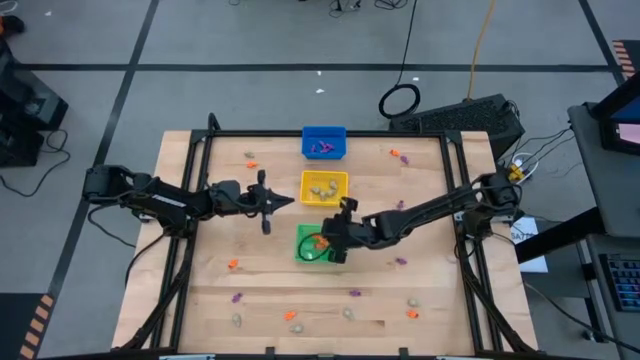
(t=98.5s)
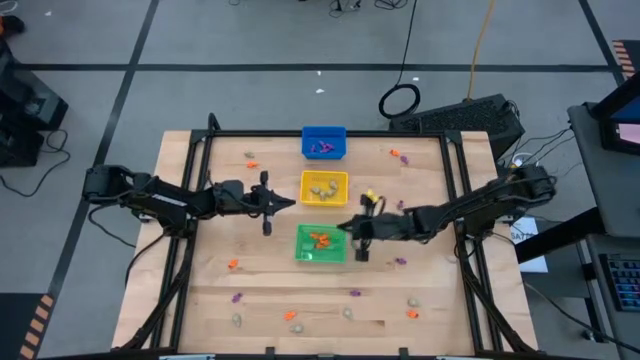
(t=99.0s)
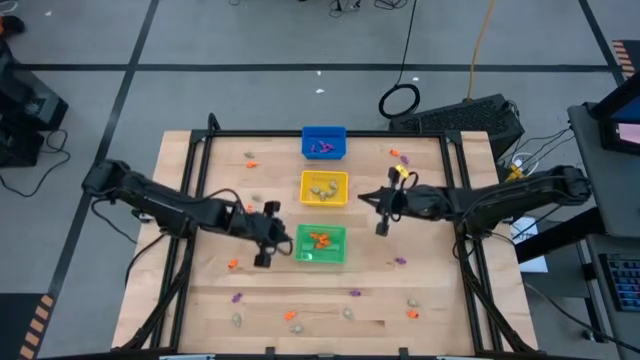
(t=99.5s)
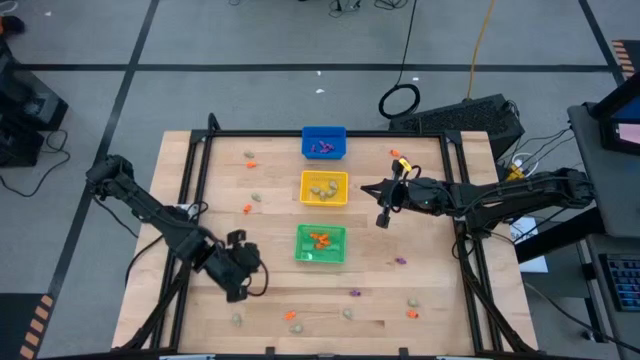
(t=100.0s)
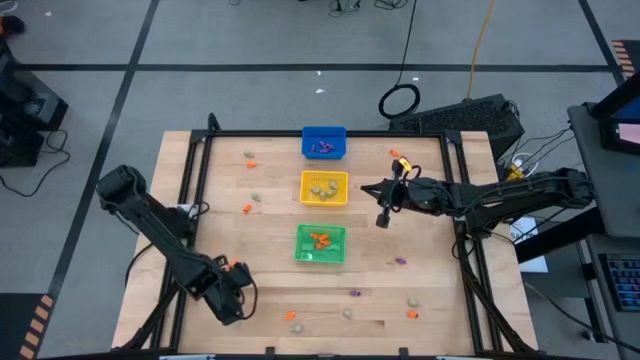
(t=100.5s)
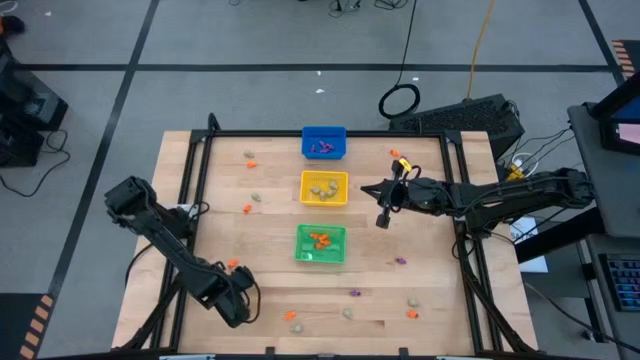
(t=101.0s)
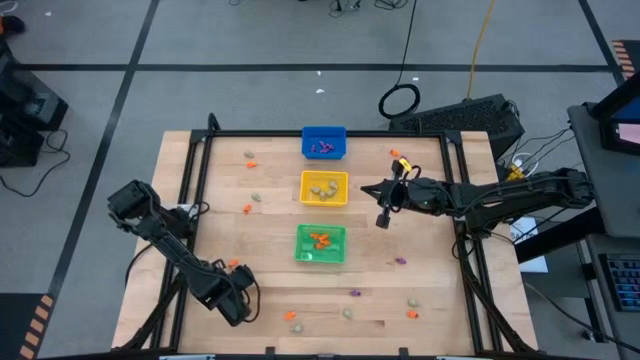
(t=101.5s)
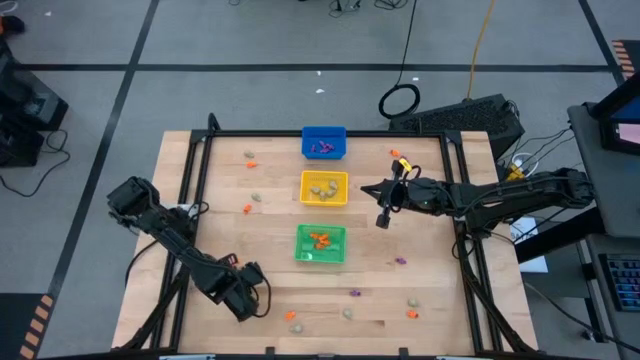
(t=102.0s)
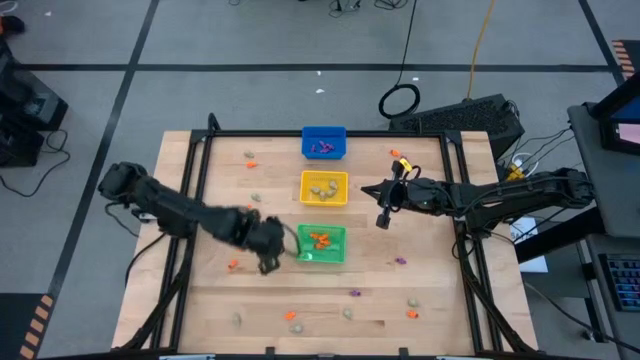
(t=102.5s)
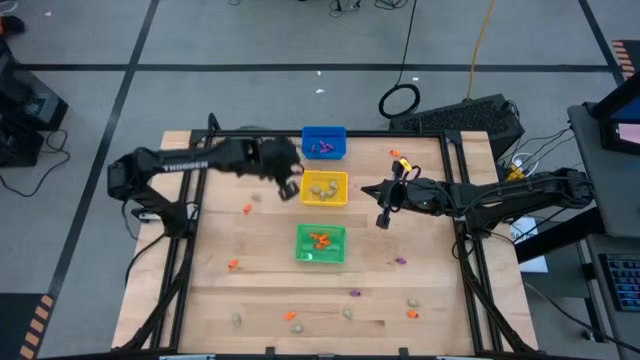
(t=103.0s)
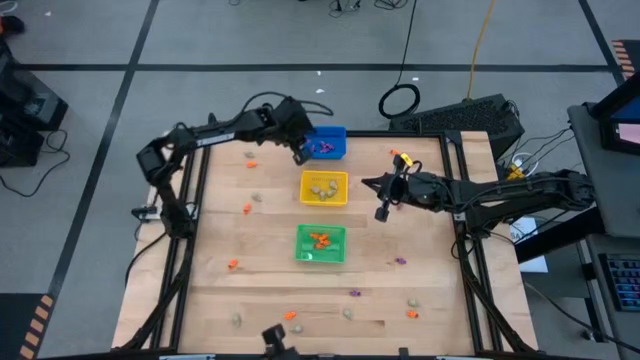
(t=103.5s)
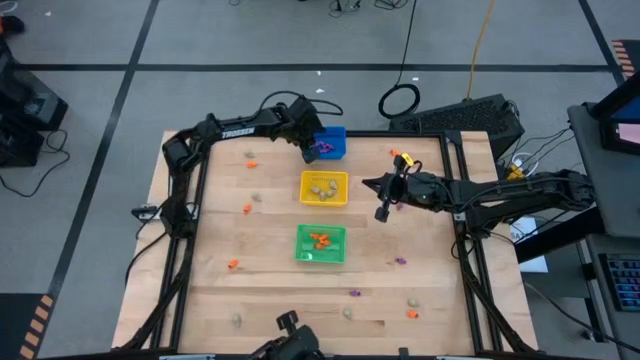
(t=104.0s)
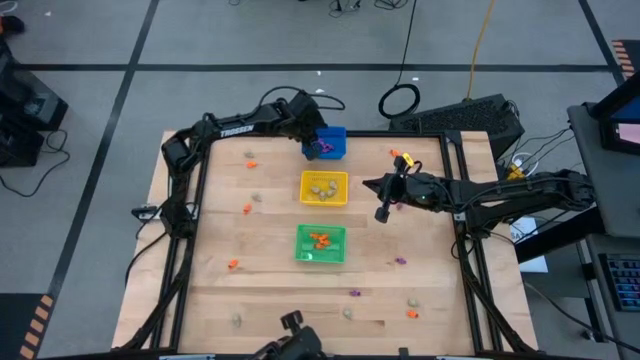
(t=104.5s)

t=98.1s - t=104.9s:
Task: Sort Halloween decoration
Put the purple skeleton toy into the blue bin

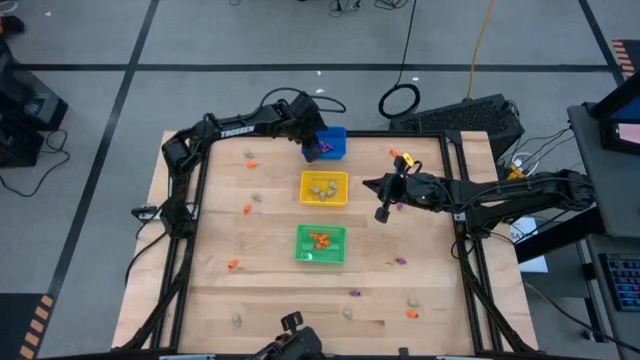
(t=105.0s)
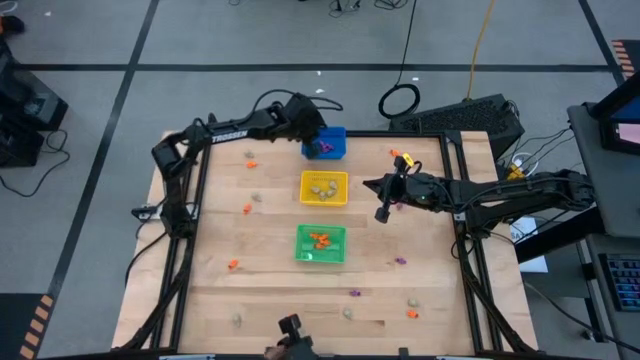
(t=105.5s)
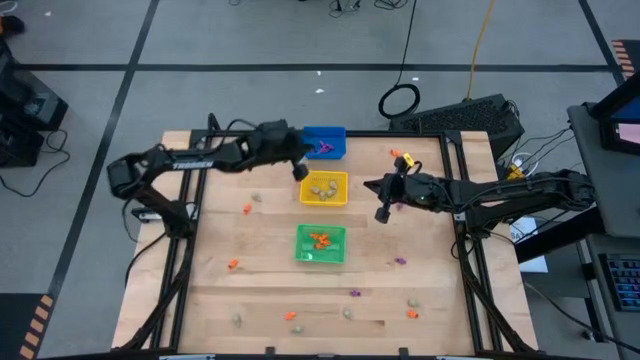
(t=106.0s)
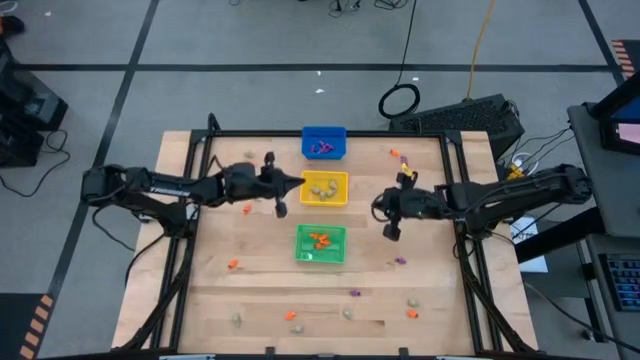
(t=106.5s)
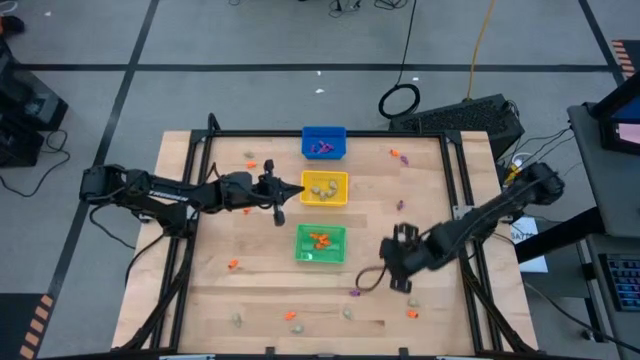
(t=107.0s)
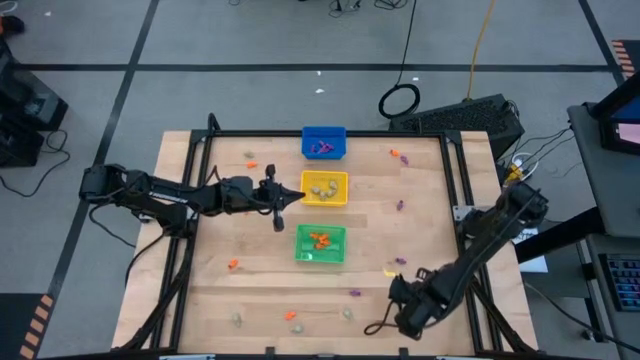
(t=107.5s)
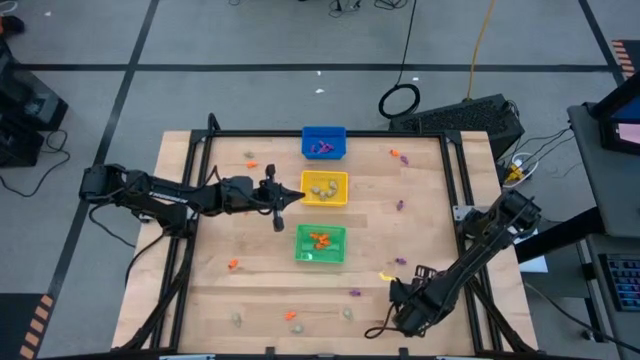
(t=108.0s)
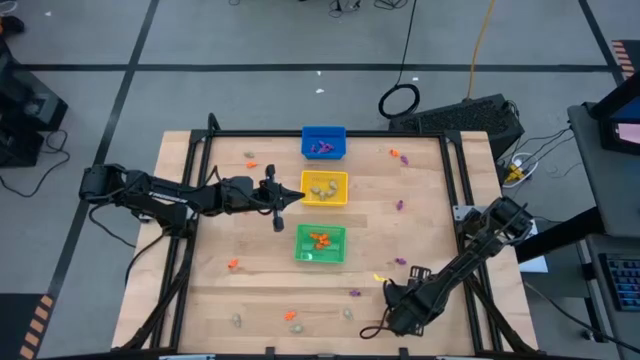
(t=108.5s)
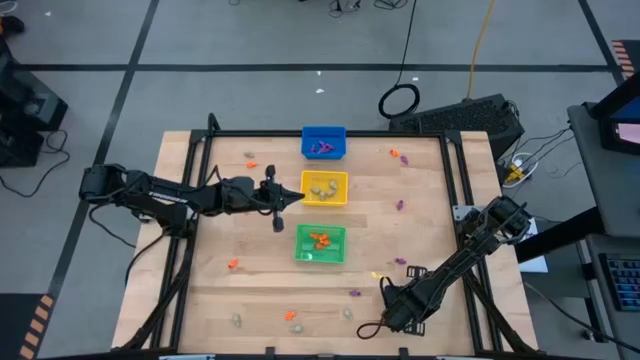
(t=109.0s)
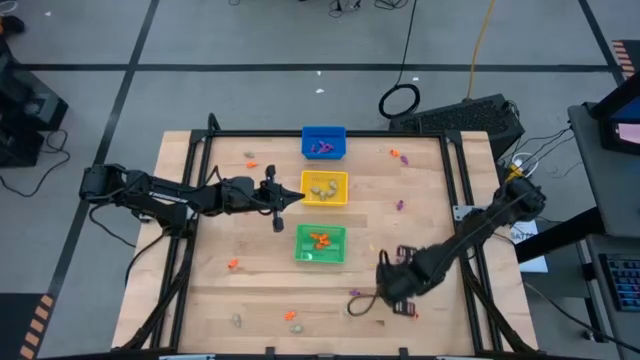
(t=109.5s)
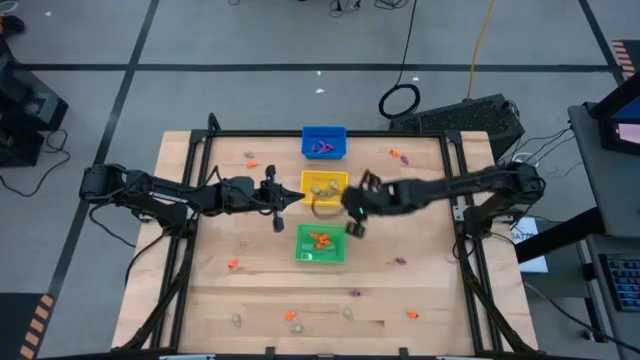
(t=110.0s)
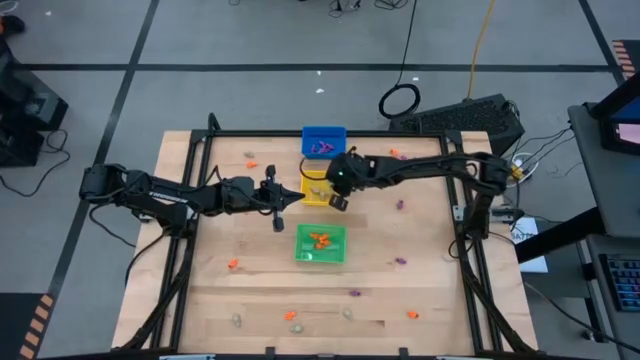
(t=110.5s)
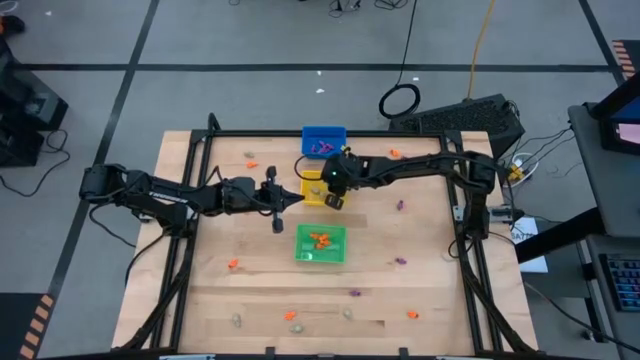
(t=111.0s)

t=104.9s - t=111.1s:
Put the skull toy into the yellow bin

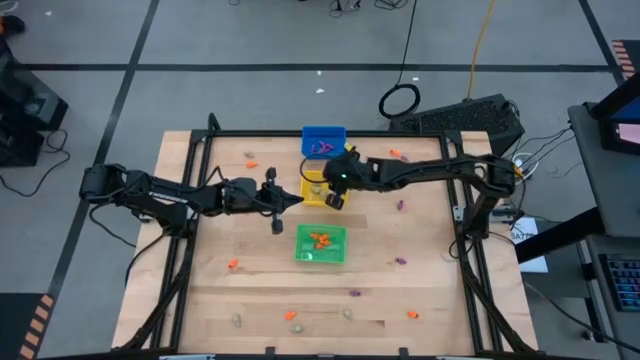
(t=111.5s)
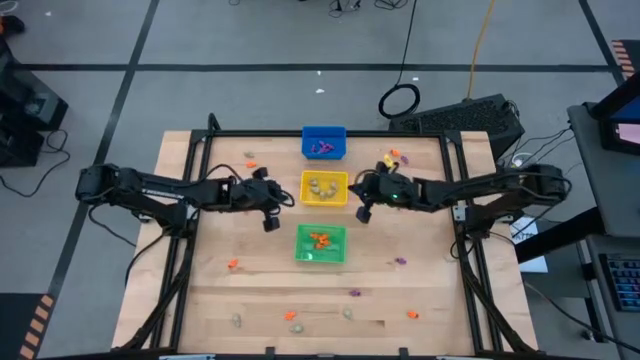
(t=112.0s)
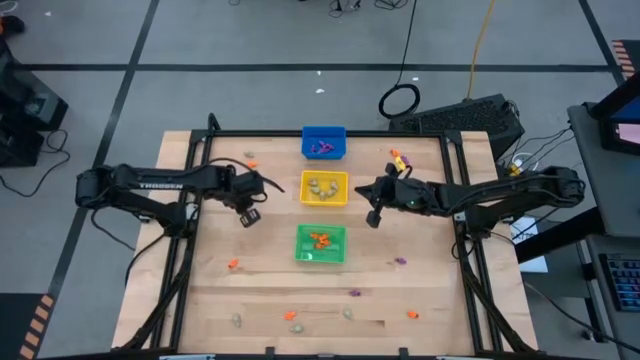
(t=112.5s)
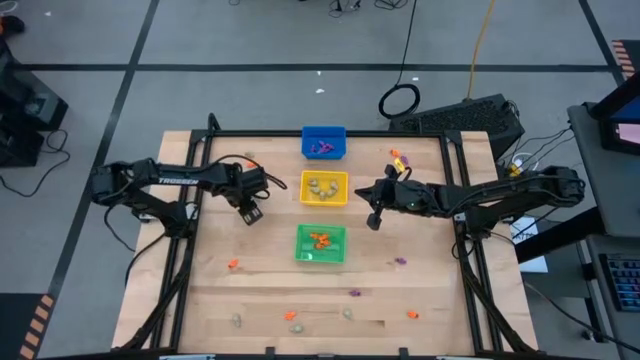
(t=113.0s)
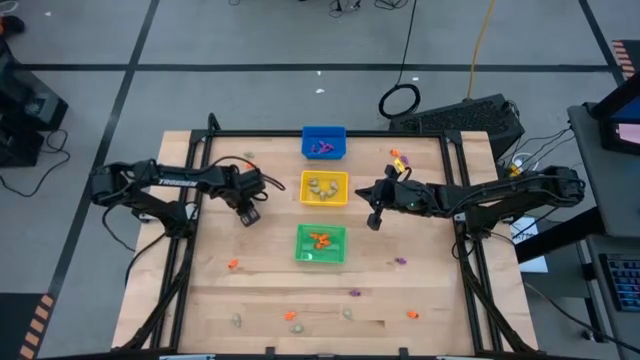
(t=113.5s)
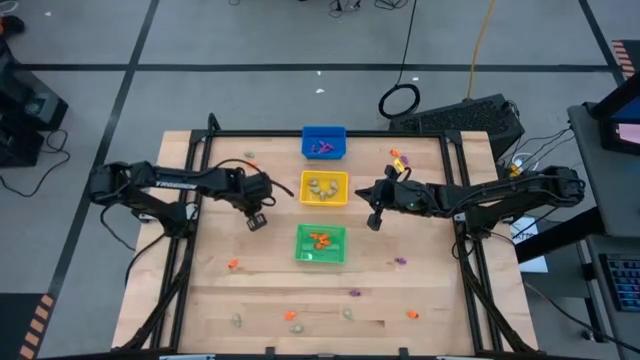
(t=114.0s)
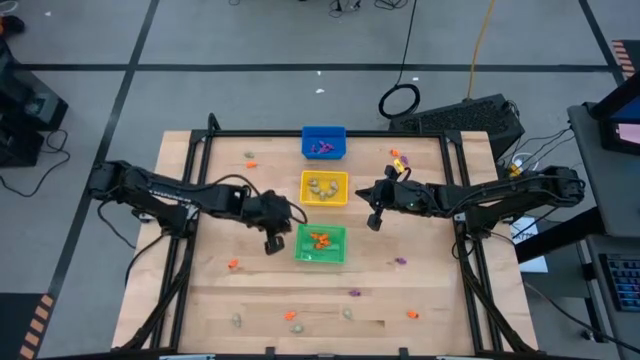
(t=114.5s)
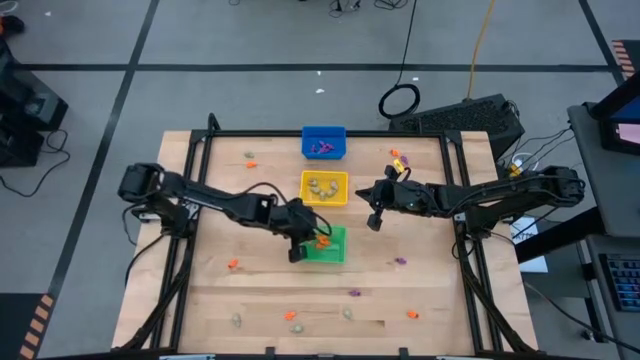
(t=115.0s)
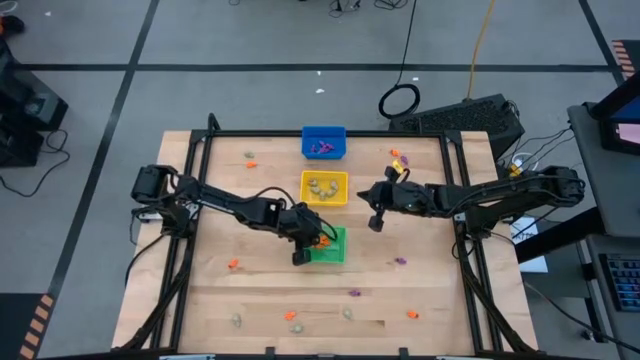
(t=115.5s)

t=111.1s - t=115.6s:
Put the orange skeleton toy into the green bin

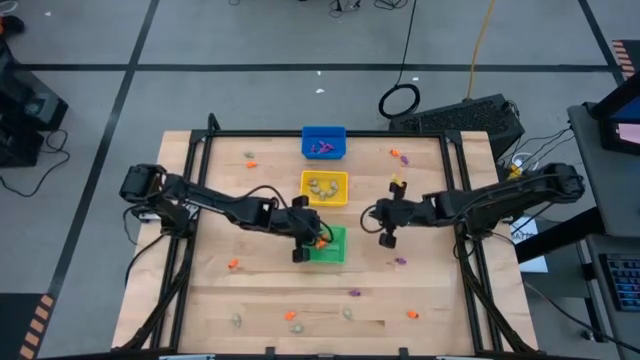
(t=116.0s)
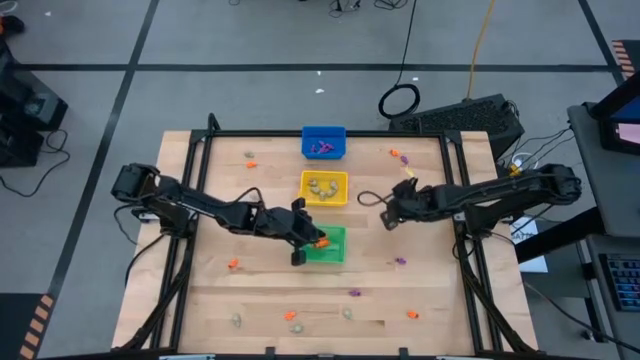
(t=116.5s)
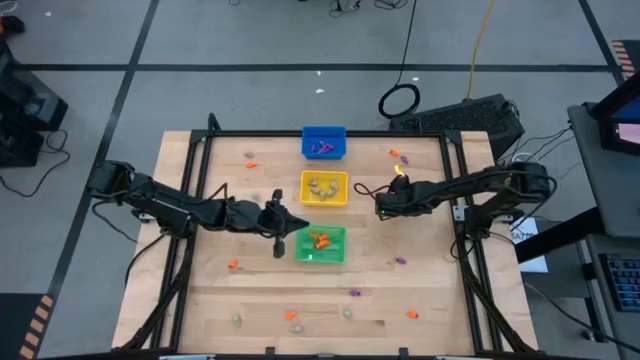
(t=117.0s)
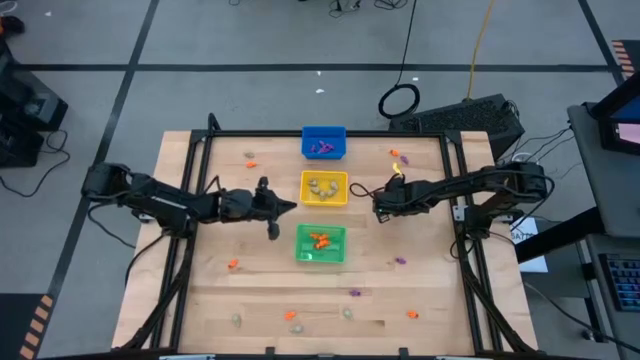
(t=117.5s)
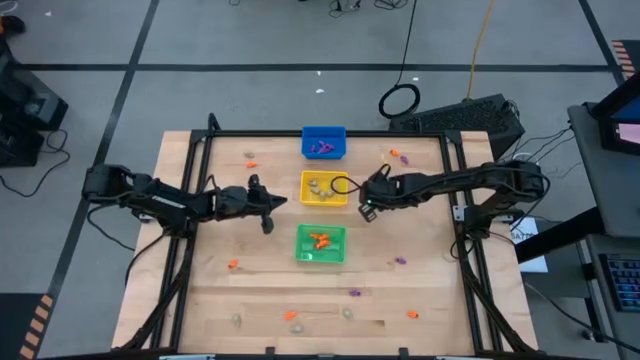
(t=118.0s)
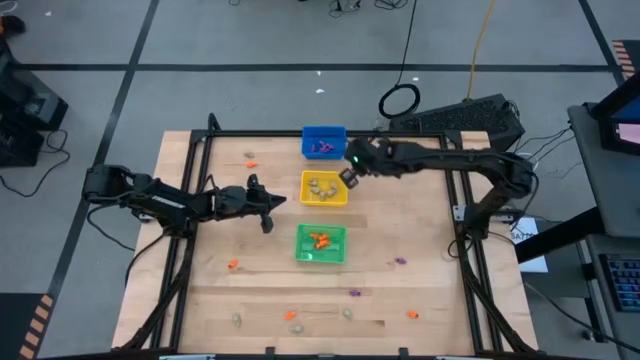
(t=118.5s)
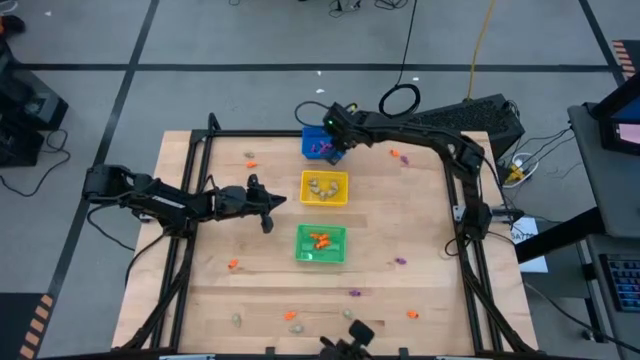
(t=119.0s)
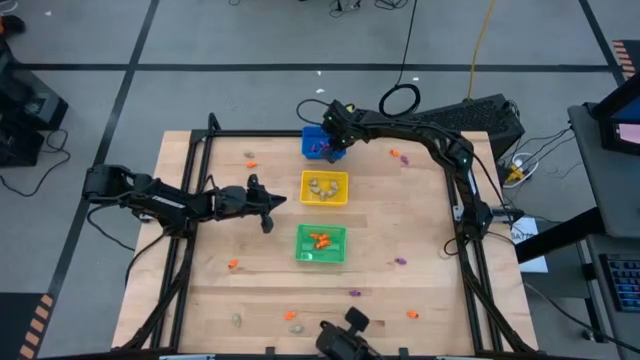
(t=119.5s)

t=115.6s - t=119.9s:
Put the center purple skeleton toy into the blue bin

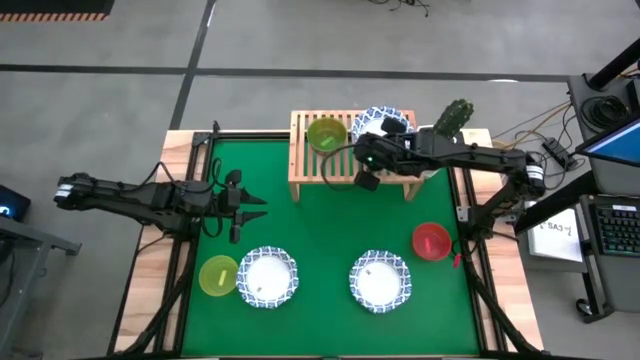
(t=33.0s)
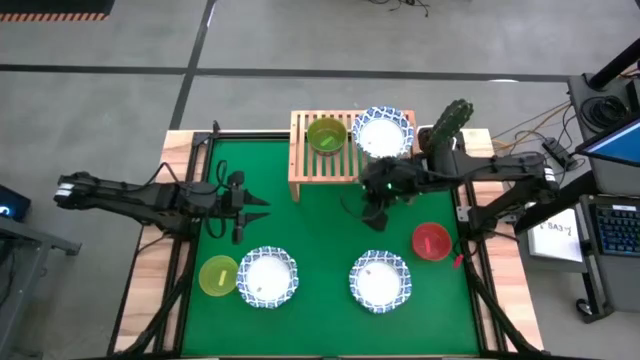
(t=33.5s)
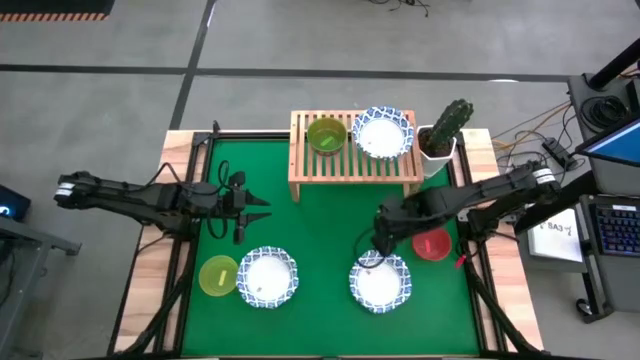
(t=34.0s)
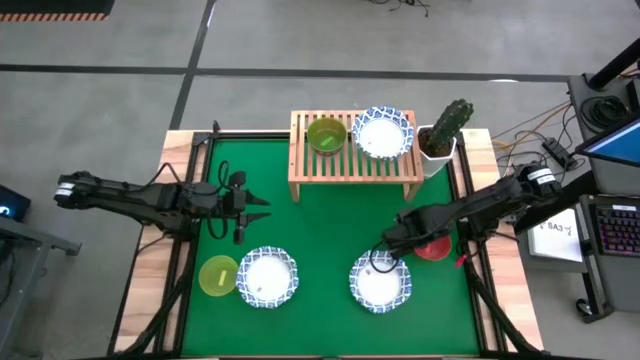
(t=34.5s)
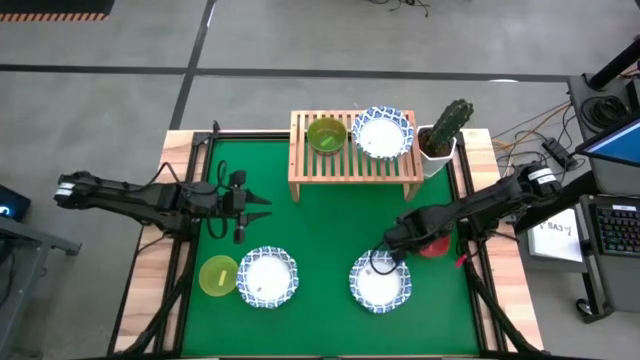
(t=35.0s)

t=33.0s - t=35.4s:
Task: Place and stack bowls onto a shelf
Stack the small orange bowl on the small green bowl on the shelf
